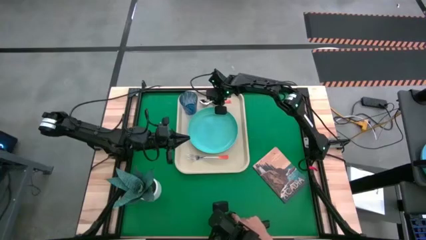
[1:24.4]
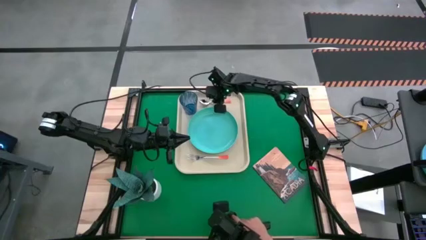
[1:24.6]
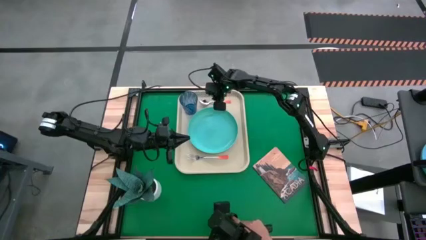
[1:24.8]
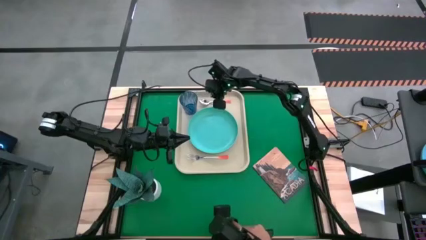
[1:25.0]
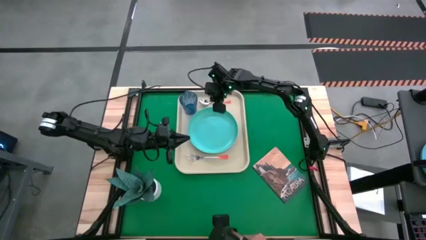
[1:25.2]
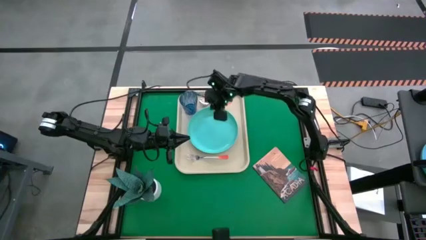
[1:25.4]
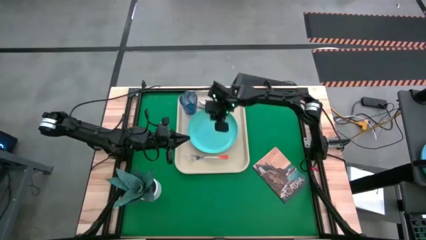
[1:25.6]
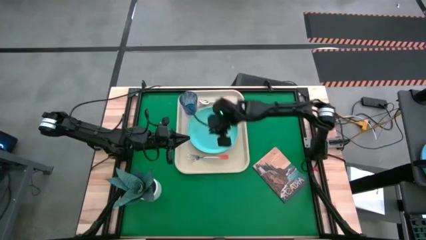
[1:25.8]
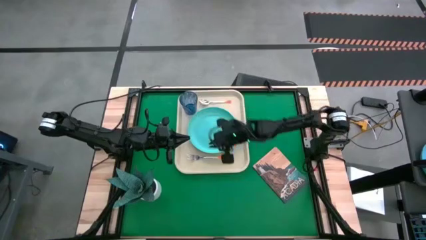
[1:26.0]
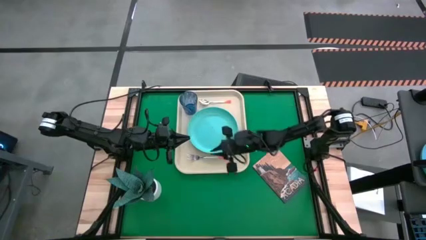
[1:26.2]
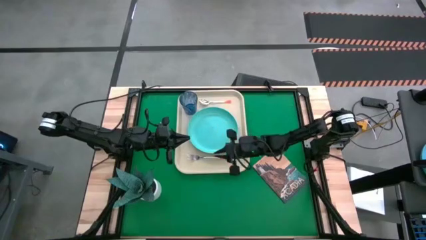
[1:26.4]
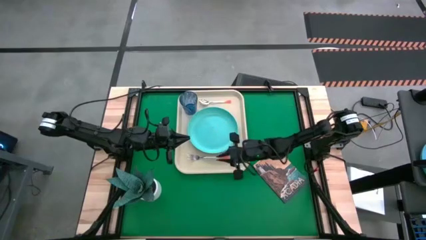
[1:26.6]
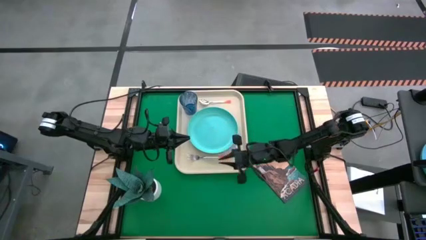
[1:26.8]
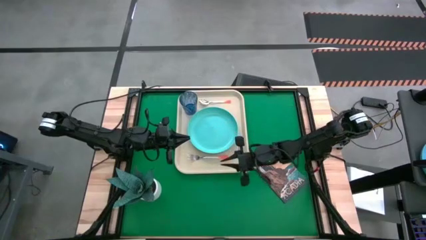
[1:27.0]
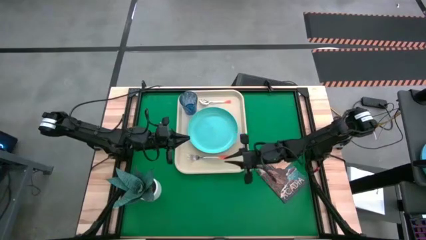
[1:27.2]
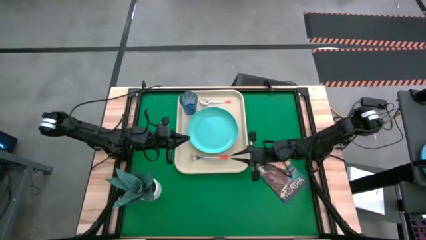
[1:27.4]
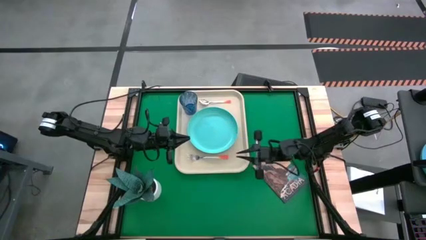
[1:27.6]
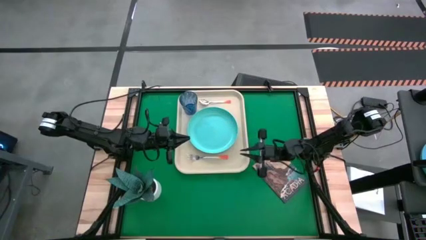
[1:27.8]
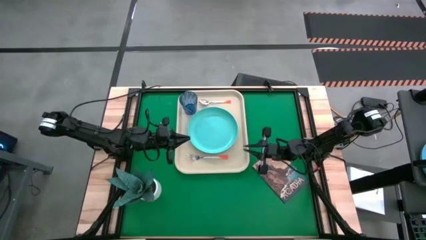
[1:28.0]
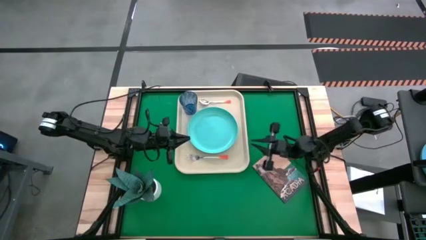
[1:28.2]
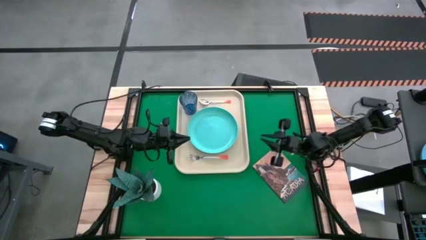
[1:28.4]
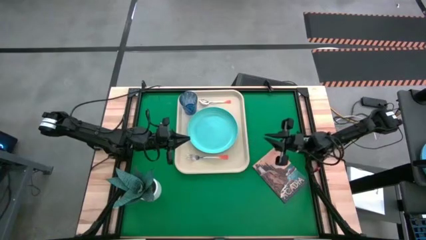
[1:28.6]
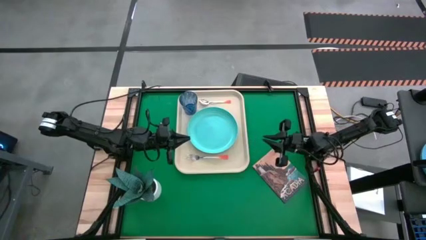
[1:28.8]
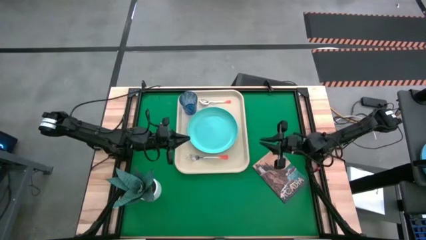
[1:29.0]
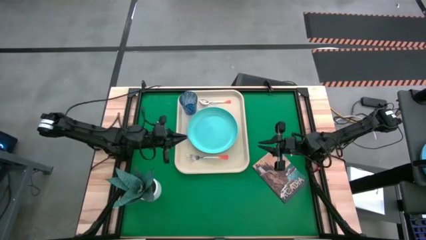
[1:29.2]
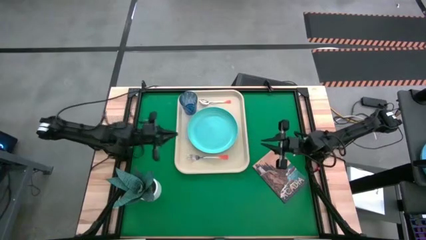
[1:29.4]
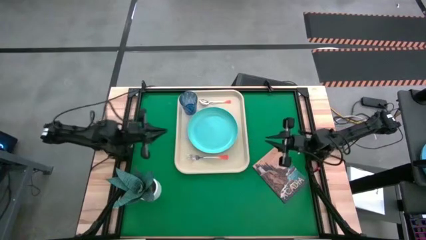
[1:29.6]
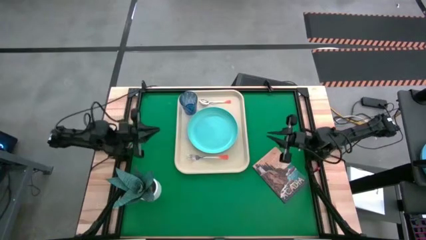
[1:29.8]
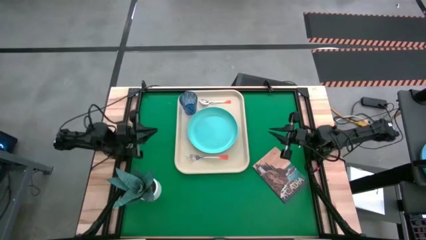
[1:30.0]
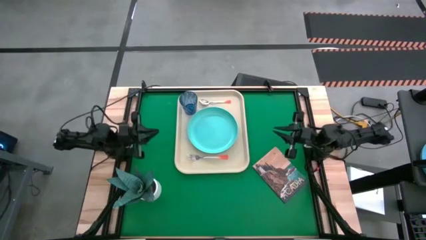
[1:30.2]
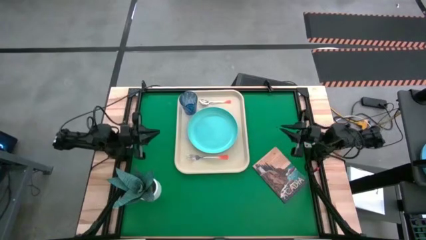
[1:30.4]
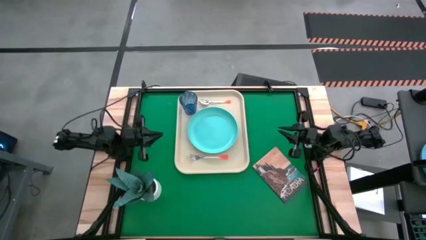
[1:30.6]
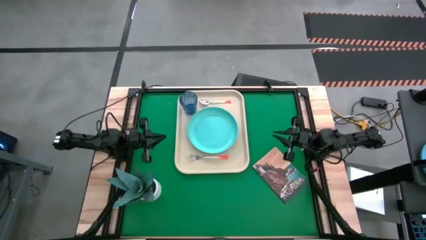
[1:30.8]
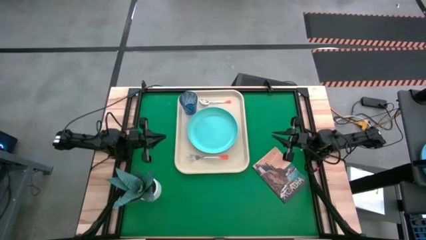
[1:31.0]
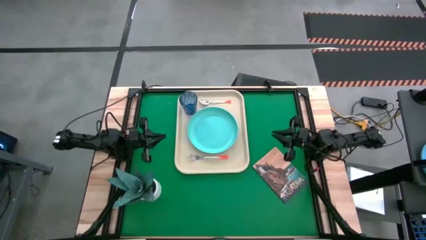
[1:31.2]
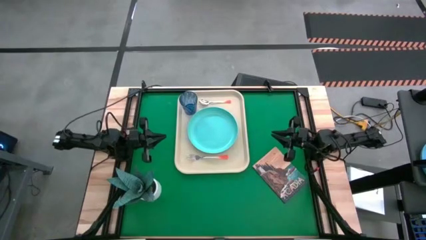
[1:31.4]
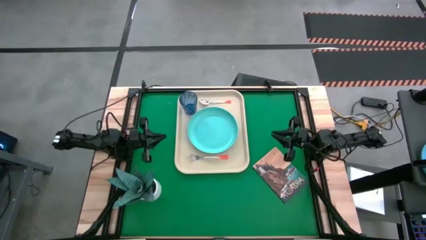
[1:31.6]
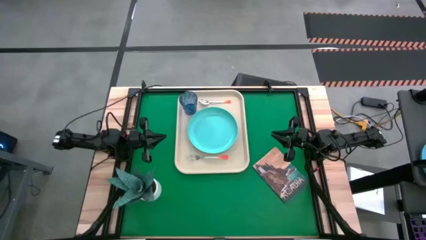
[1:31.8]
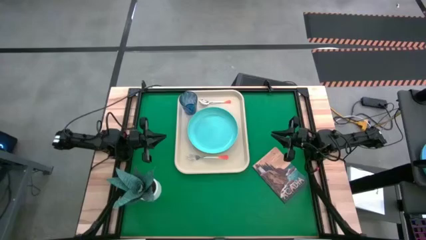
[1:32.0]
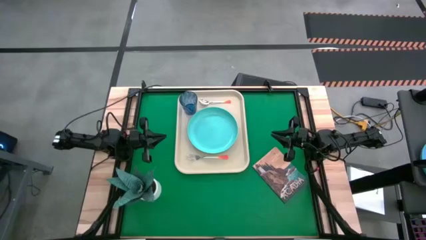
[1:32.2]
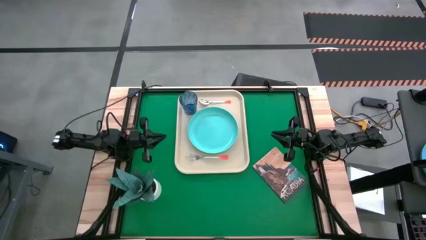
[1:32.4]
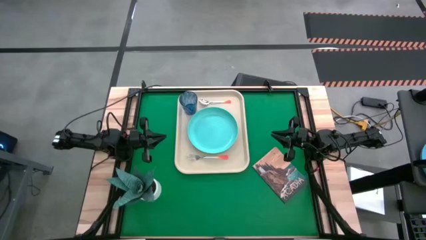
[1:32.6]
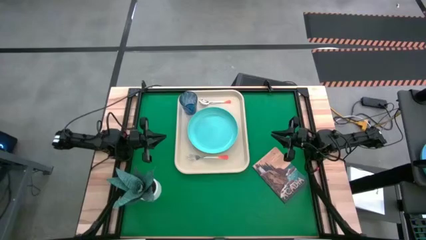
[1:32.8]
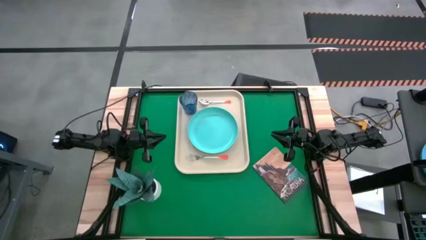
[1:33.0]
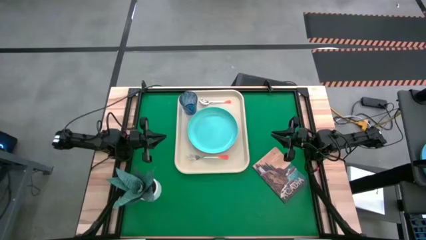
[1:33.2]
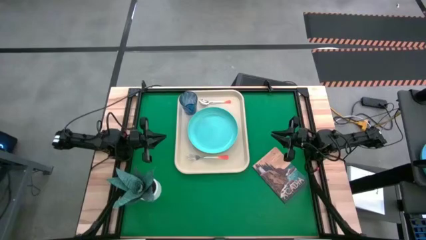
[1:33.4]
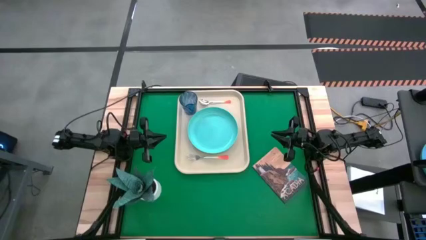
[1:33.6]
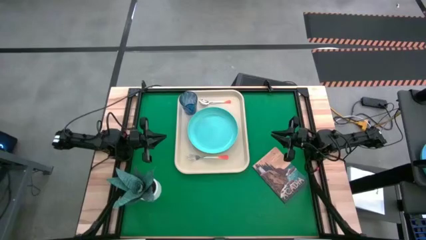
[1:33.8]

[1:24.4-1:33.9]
Task: Pick and place plate/cup/fork/spoon on tray
Return to Home Position

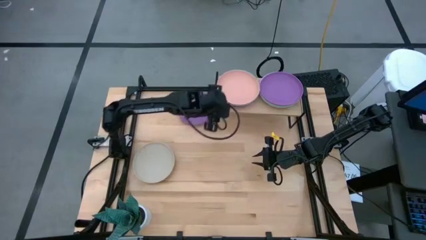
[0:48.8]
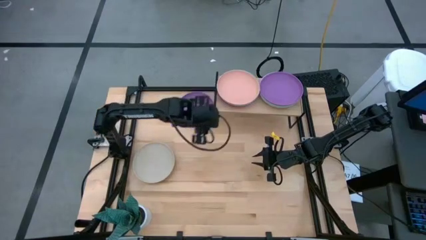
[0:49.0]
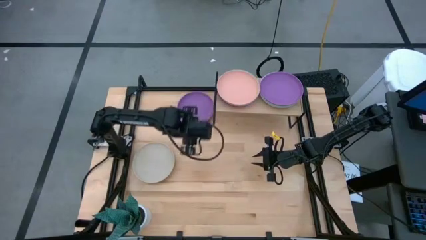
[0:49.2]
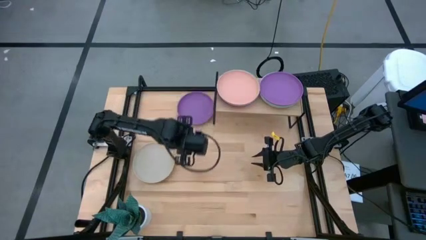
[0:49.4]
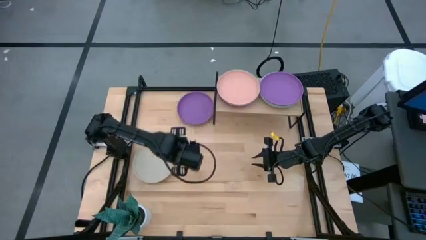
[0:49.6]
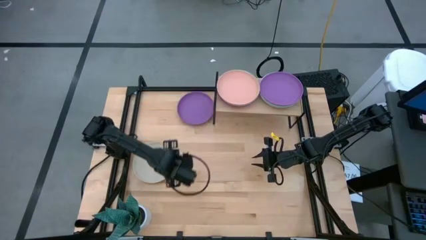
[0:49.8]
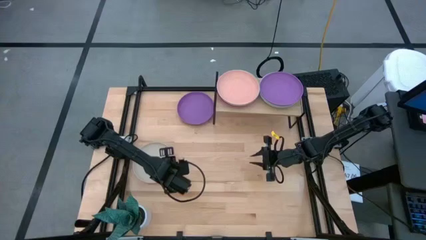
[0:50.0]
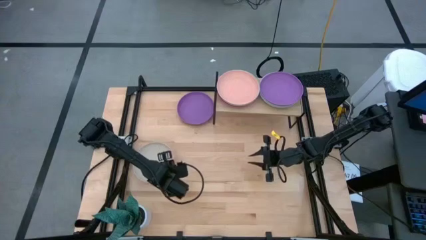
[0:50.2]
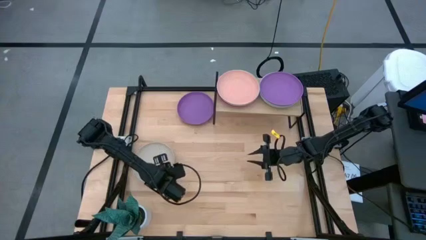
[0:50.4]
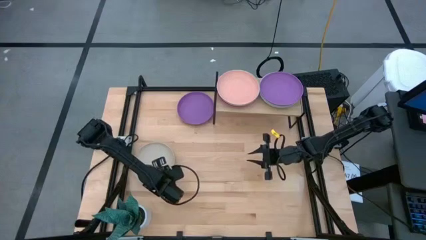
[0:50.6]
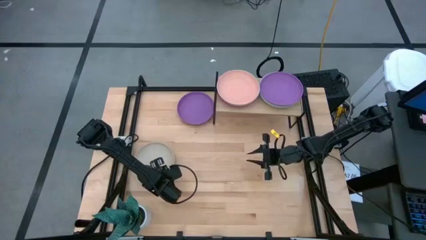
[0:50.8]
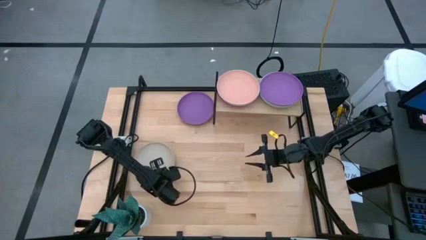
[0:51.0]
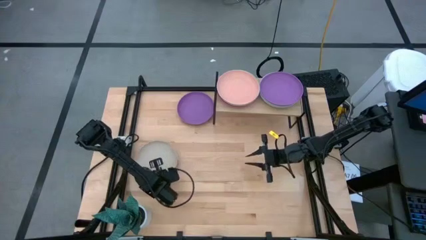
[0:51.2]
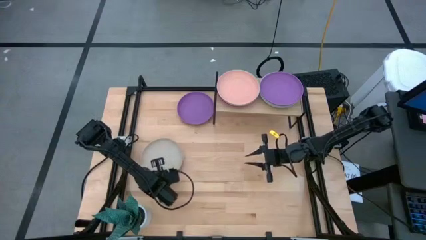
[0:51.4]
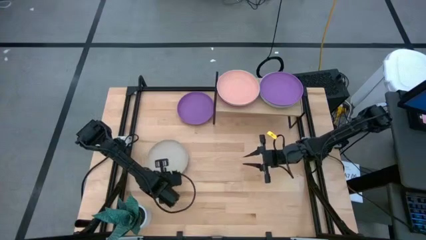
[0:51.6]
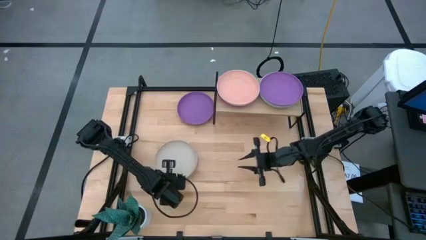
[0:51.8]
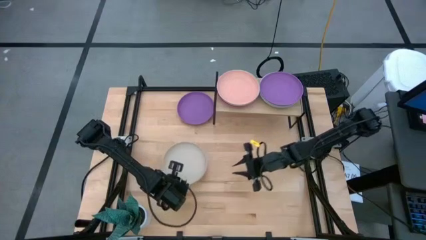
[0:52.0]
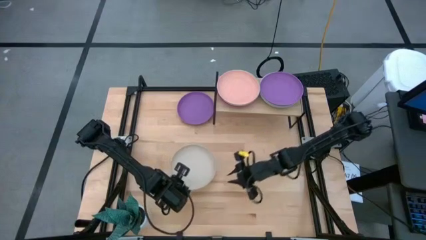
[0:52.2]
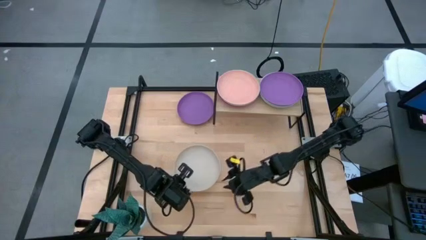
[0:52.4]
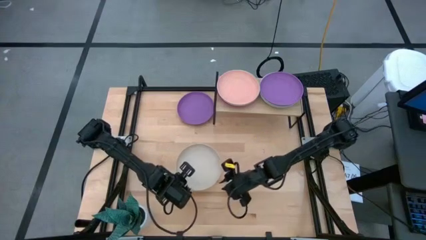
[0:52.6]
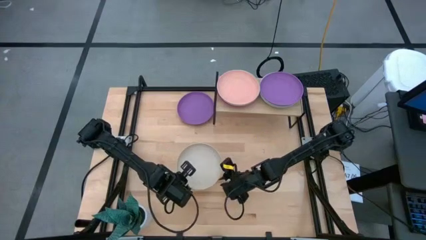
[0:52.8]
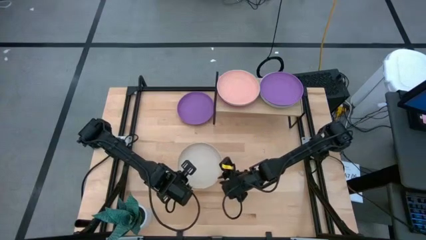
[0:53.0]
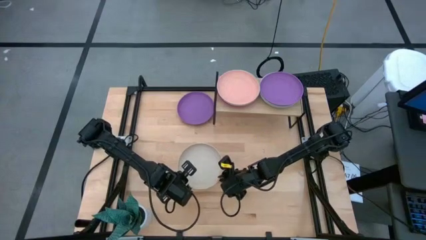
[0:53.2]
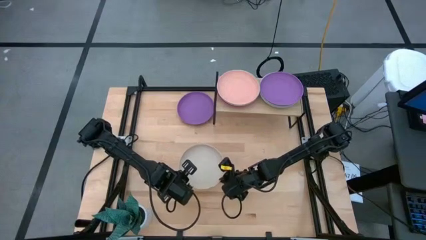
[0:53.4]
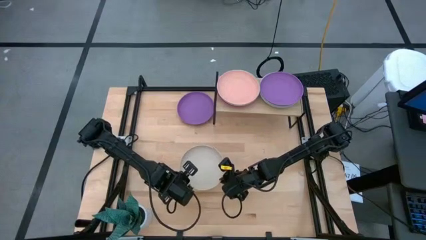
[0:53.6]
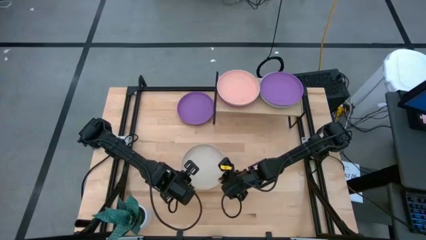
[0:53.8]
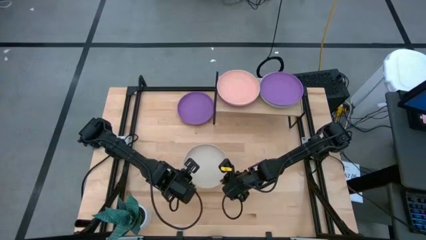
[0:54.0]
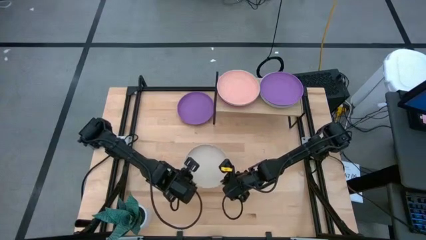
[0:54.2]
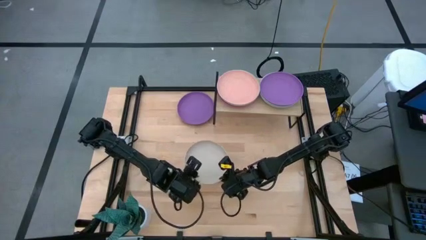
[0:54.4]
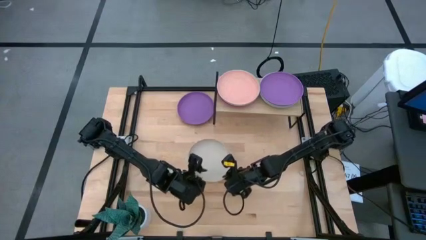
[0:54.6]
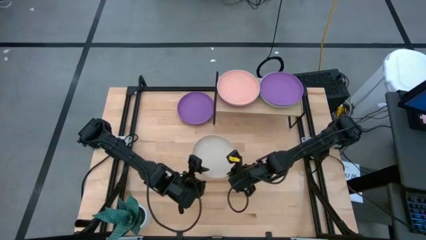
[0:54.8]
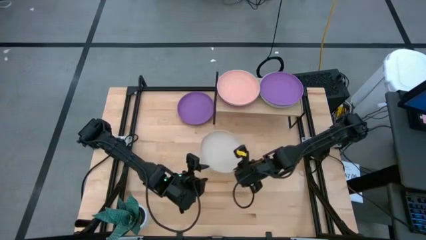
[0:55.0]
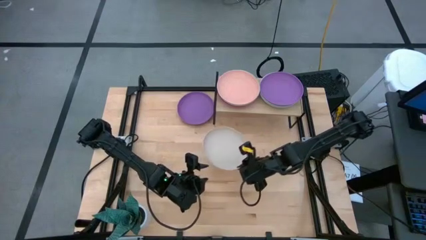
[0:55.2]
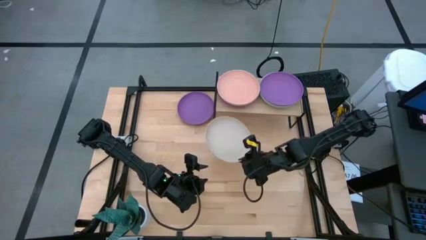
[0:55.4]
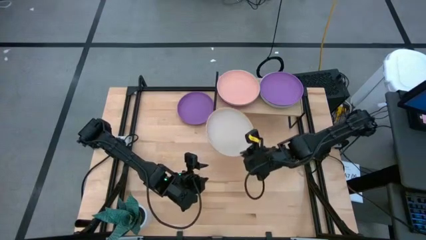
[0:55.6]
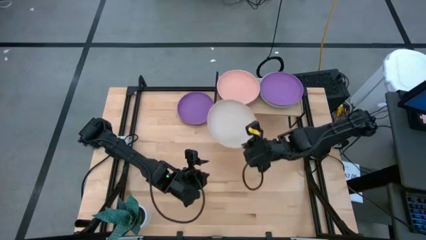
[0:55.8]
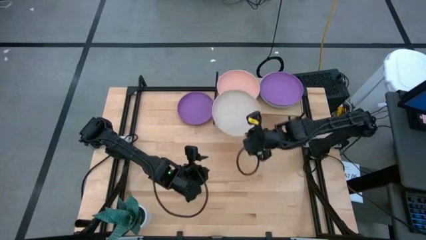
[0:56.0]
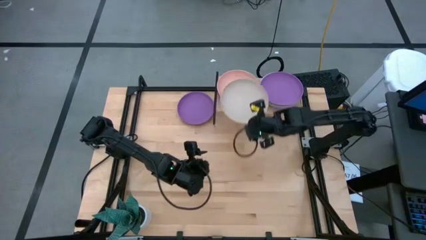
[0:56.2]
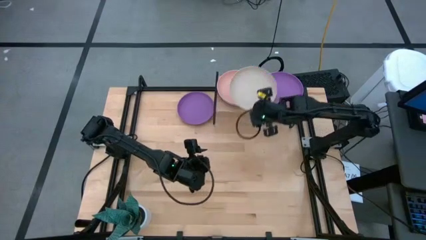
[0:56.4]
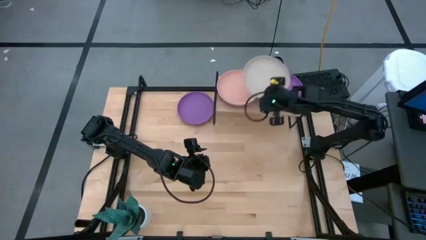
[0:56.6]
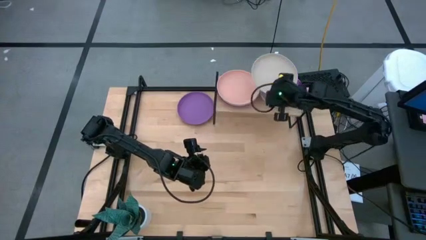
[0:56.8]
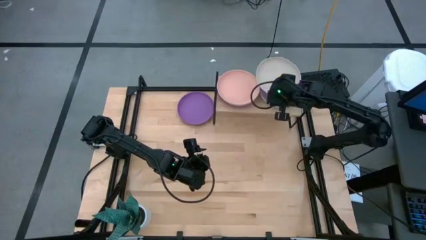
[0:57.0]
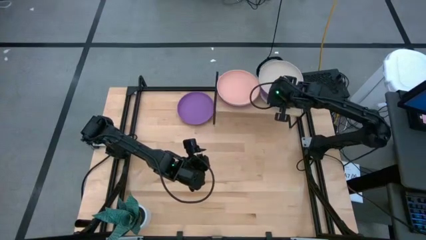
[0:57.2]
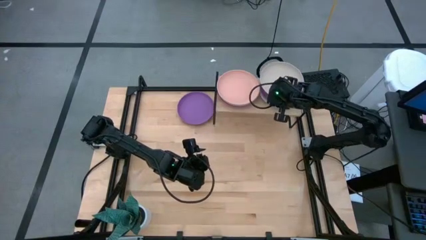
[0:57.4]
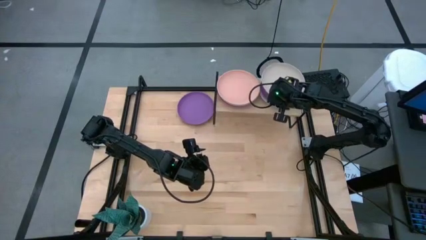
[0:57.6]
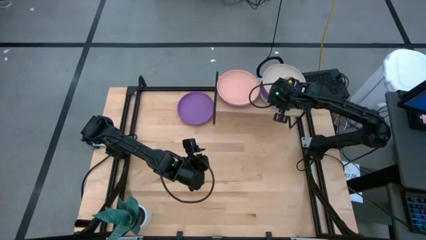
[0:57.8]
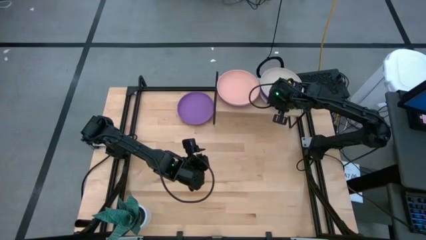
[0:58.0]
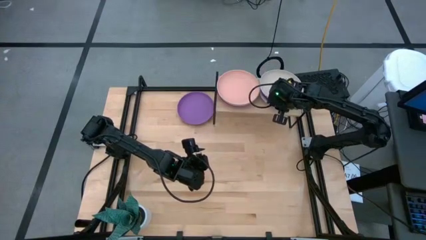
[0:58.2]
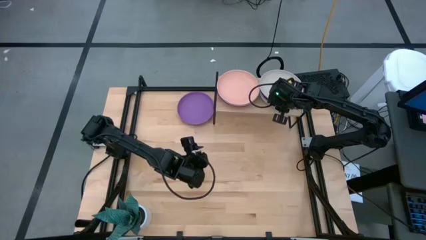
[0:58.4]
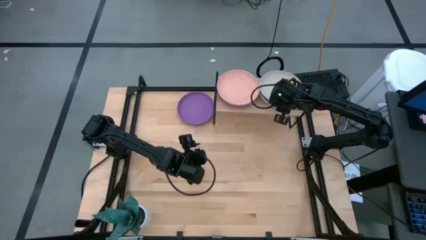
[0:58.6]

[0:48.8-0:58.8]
Task: Place and stack plates onto a shelf
Stack the gray plate on top of the violet plate on the shelf
